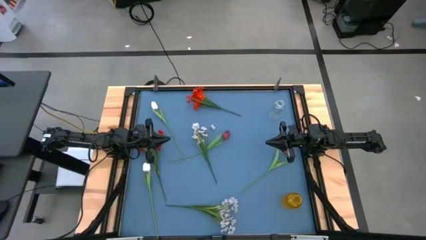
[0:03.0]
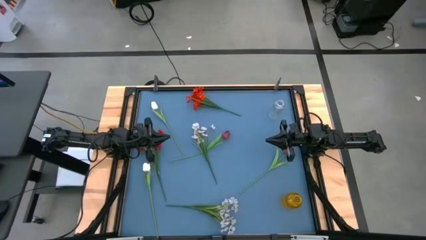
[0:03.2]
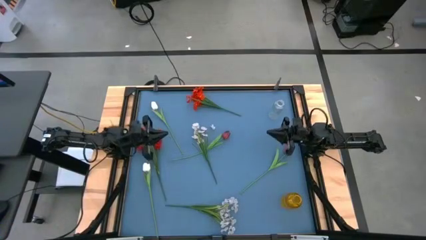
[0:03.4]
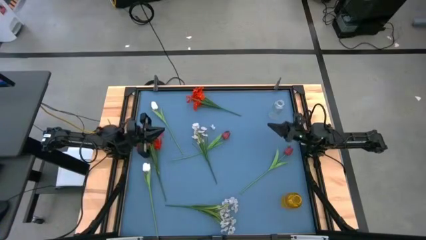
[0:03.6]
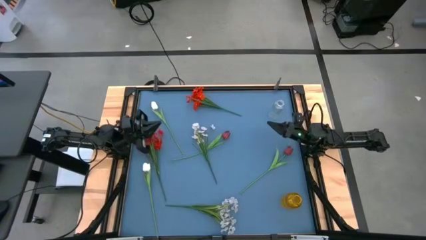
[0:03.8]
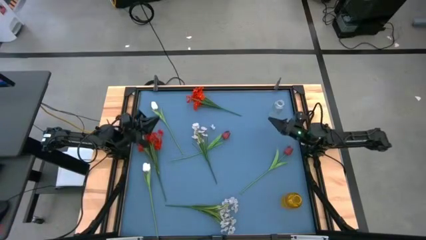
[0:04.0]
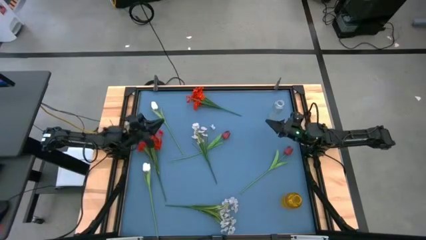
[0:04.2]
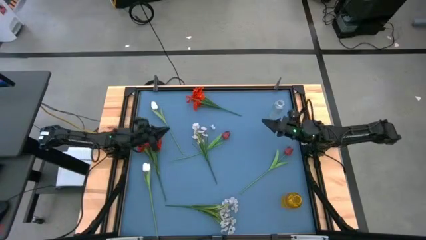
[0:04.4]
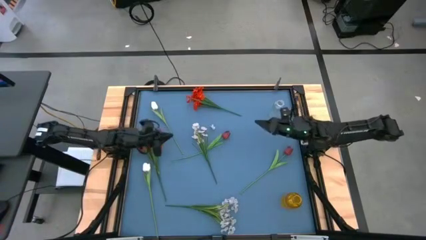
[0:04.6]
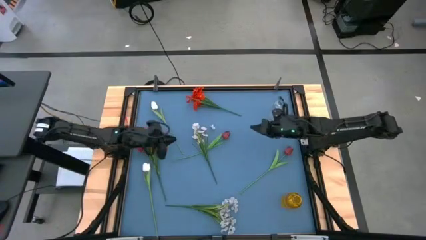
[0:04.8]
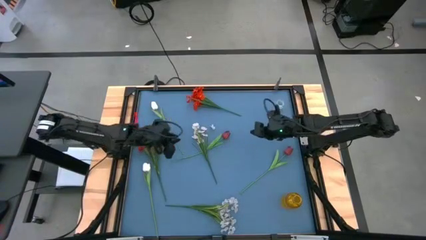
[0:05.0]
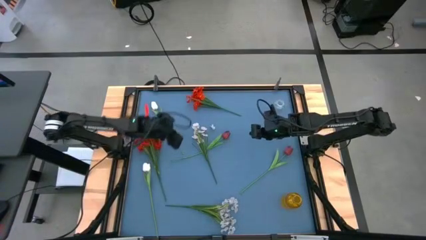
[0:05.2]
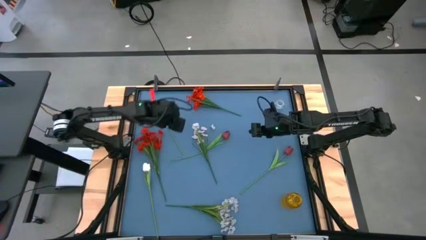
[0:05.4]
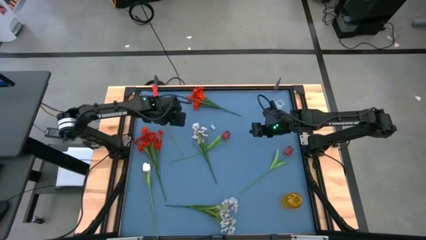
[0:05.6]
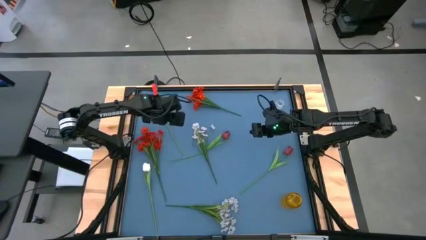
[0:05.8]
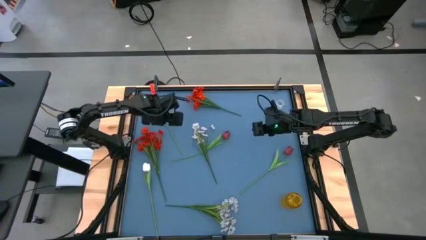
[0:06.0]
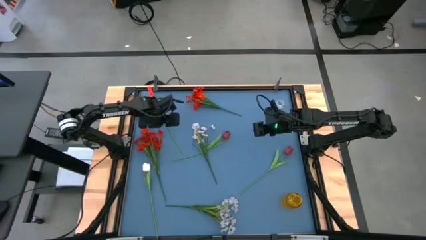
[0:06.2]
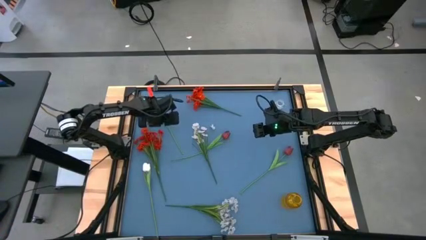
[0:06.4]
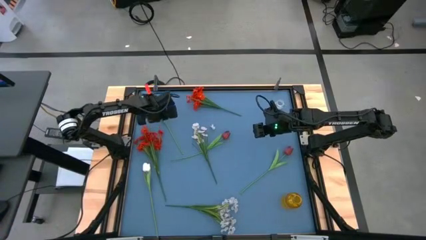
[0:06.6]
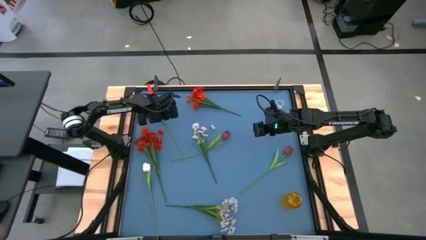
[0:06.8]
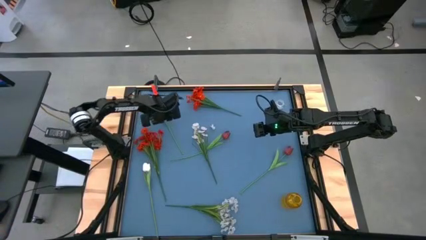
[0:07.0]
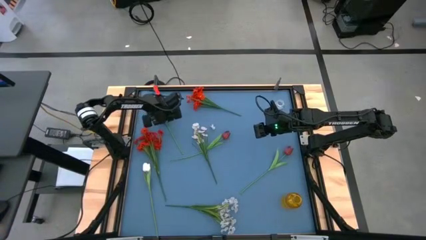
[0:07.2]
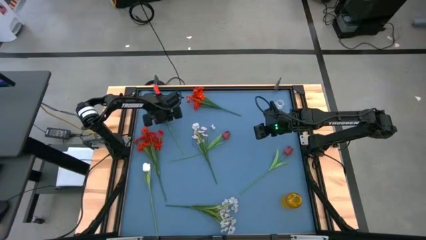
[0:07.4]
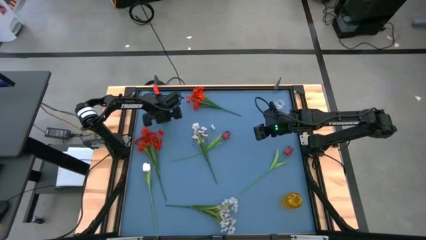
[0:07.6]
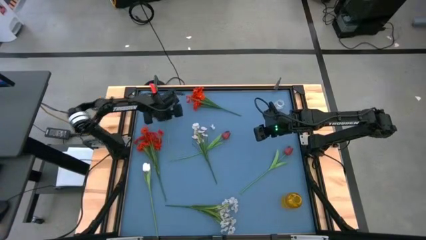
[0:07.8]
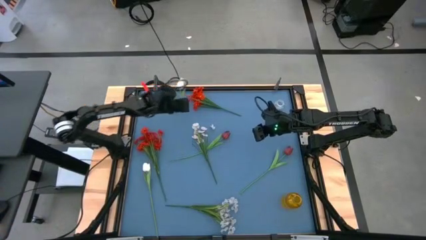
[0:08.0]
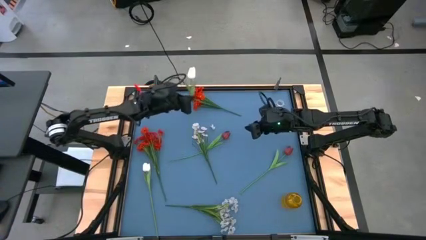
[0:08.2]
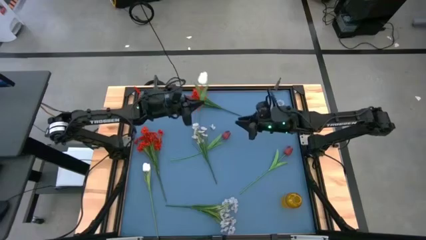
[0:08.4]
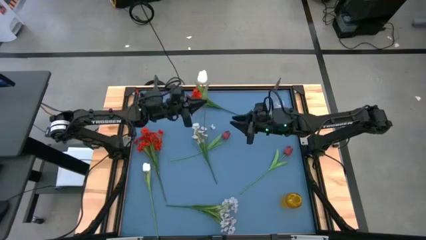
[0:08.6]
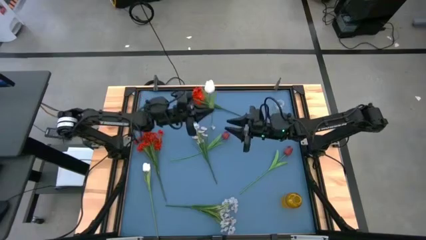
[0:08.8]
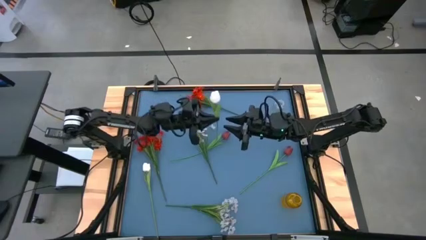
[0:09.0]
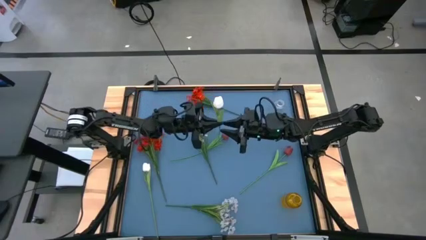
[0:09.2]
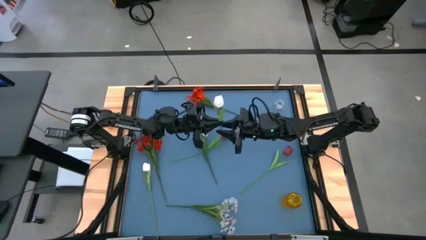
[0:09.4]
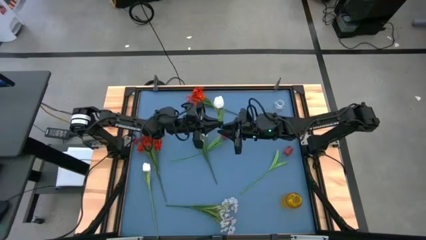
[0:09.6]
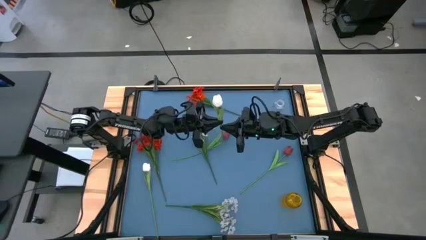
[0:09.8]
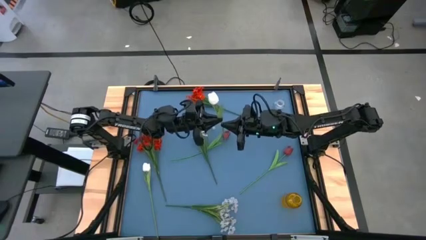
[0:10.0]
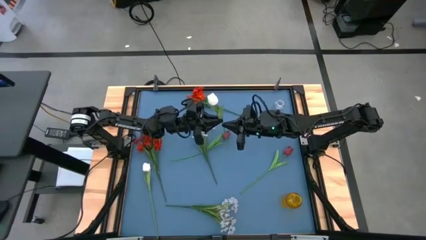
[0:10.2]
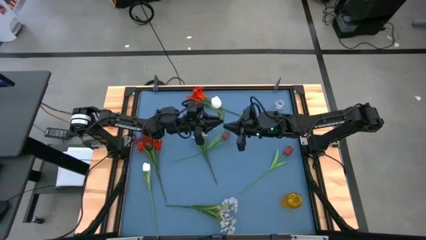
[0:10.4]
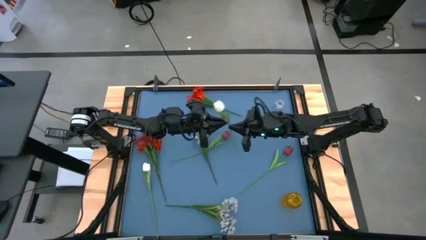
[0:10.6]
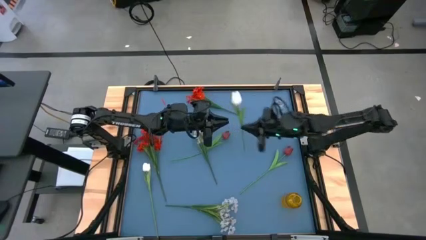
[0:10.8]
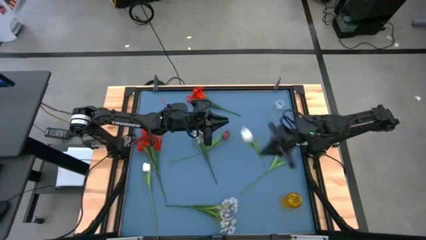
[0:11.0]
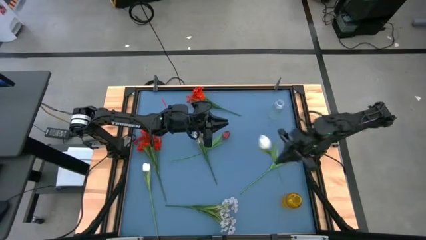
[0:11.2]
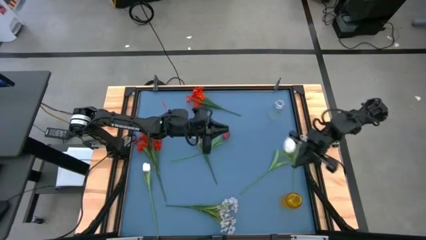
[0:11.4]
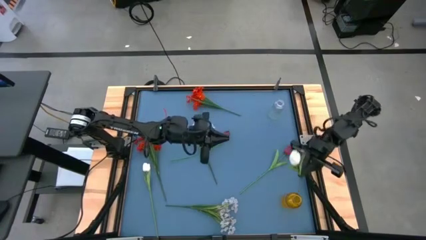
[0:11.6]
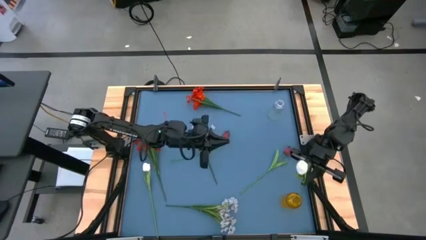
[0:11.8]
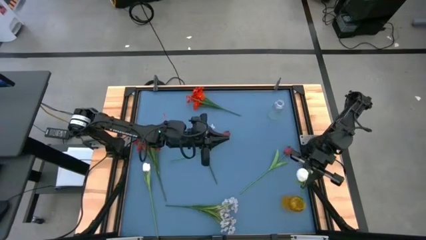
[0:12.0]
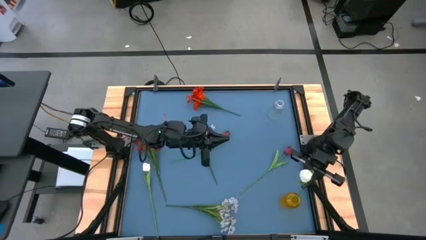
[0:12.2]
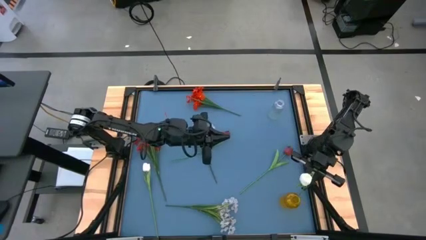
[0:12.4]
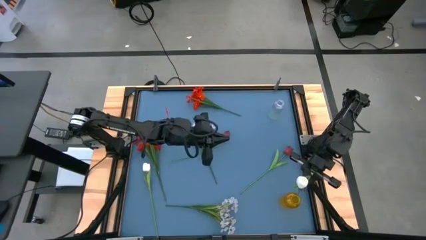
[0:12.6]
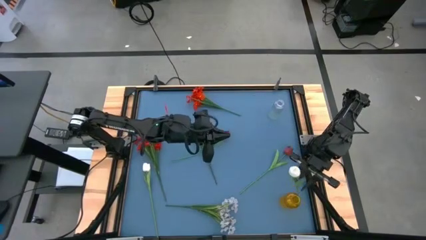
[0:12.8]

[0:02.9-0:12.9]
Task: Sort flowers into vase by color
Put the top white flower into the yellow vase
